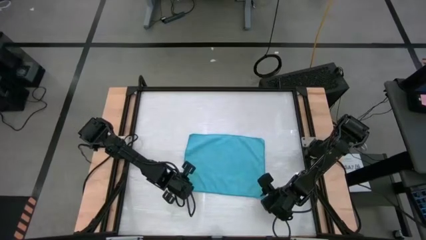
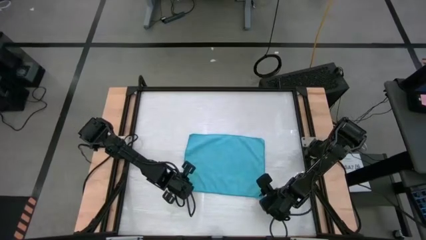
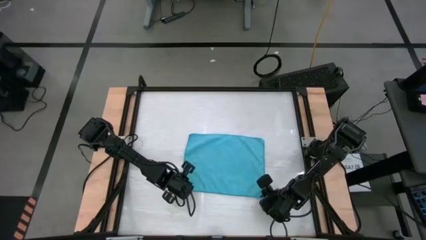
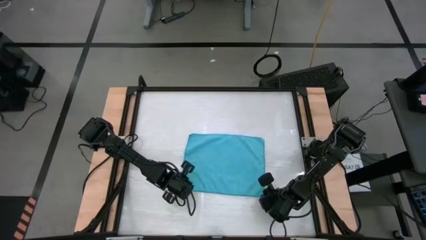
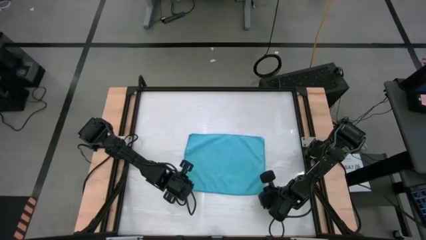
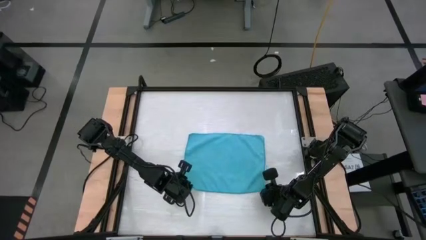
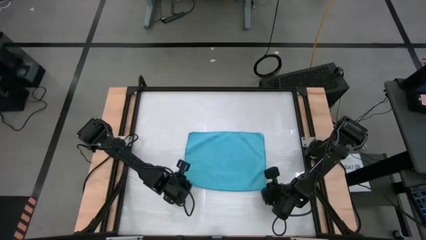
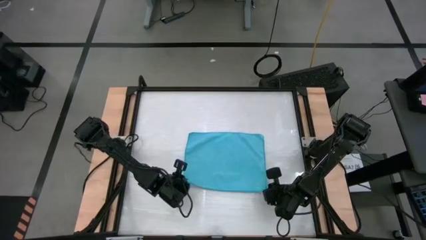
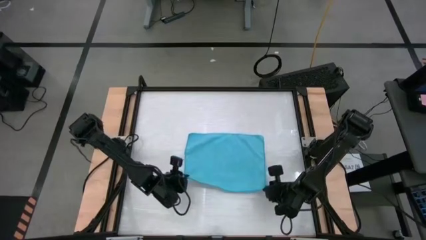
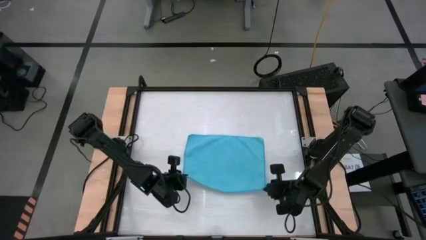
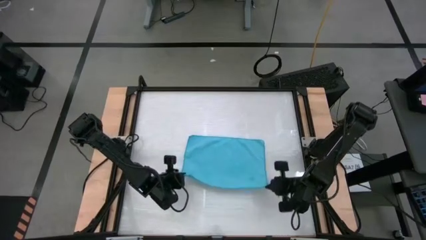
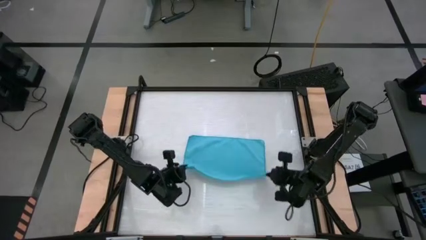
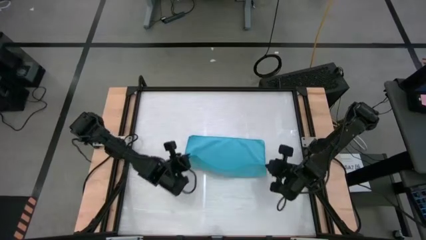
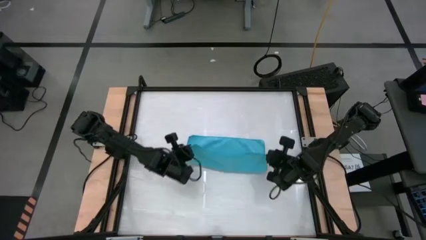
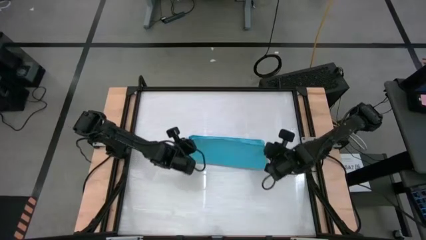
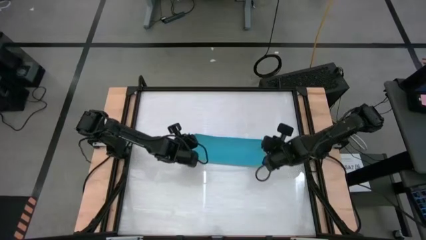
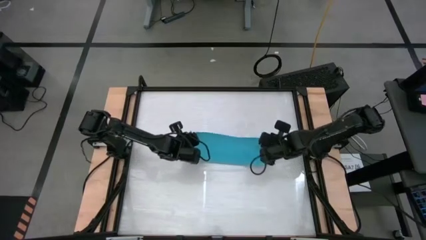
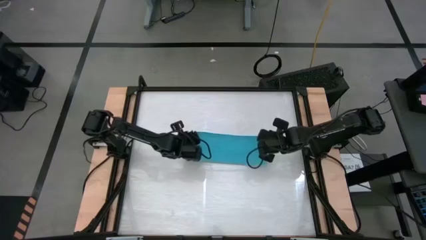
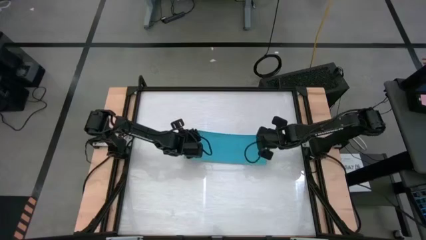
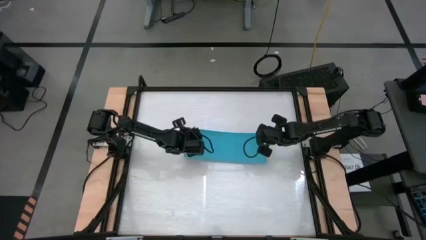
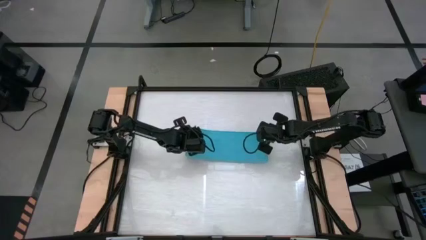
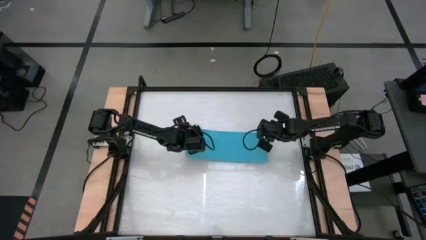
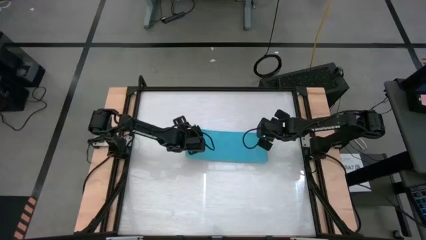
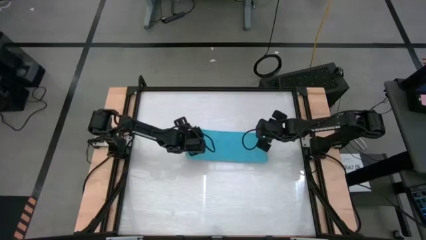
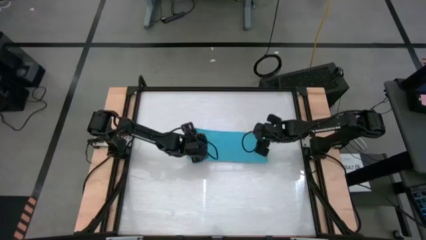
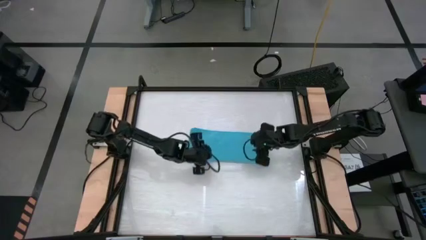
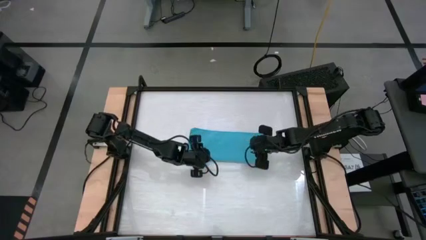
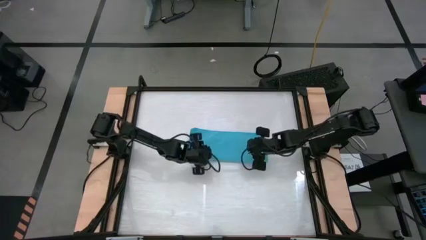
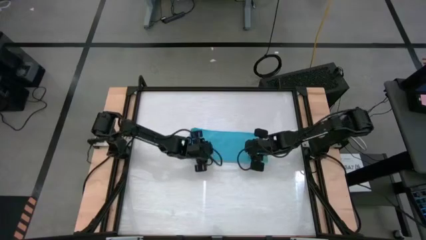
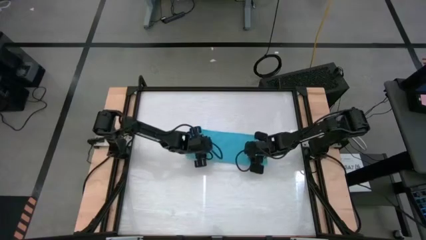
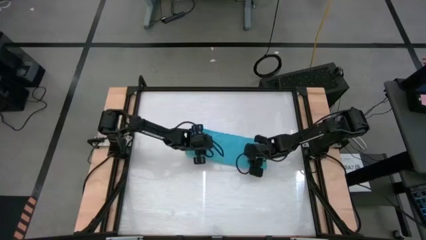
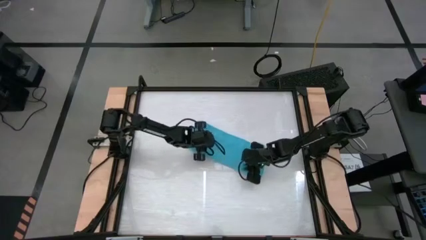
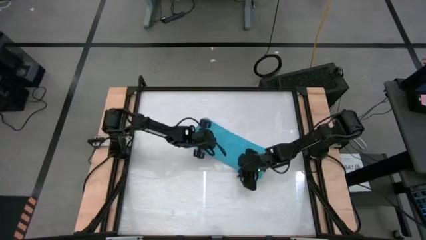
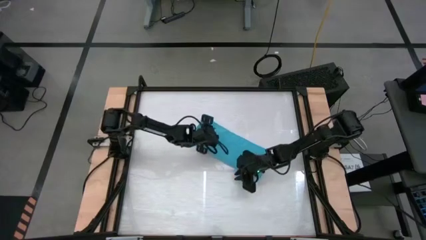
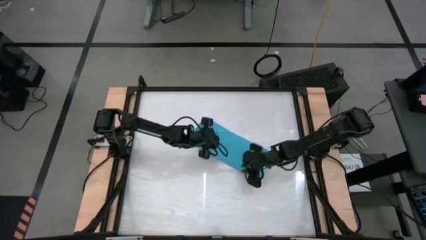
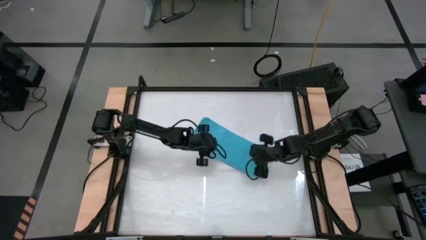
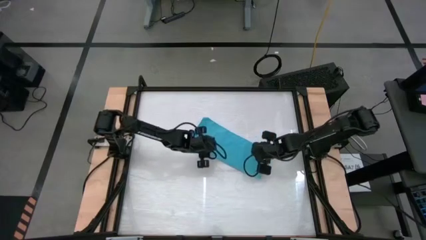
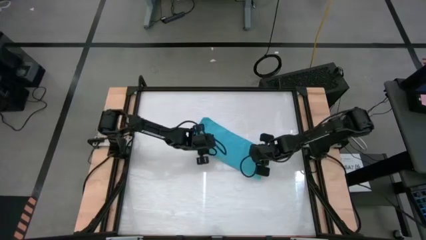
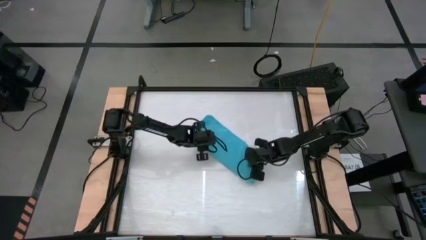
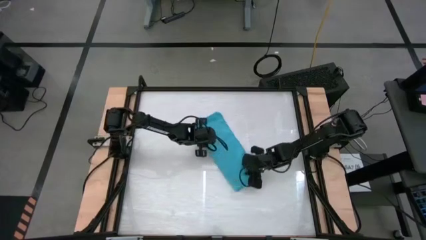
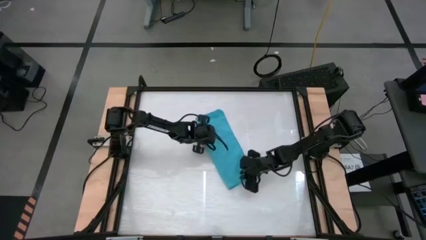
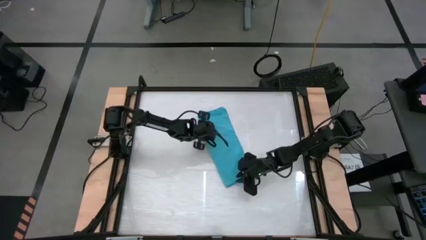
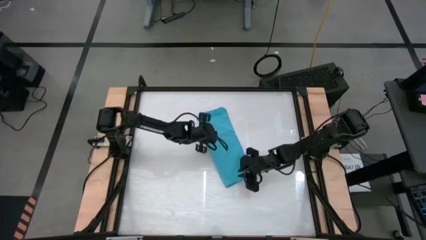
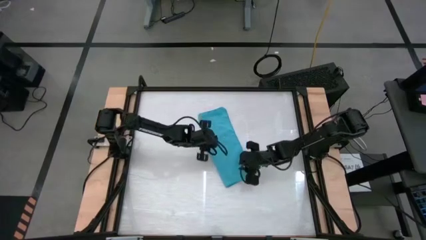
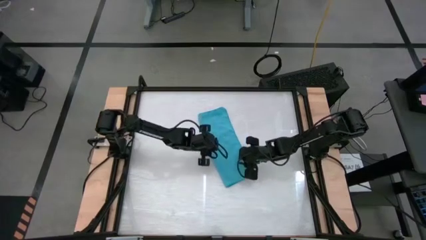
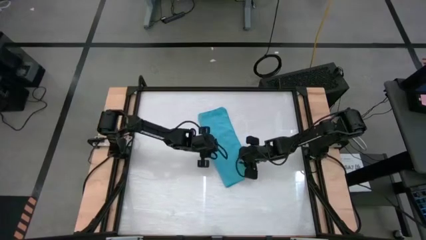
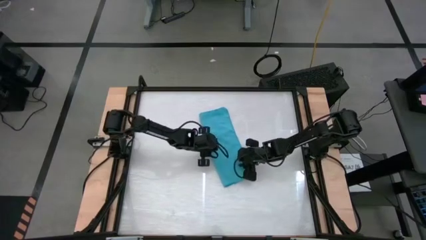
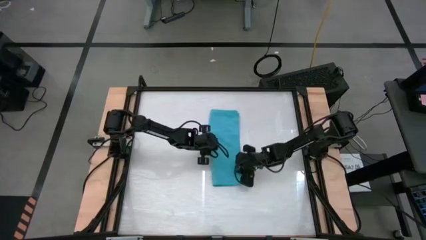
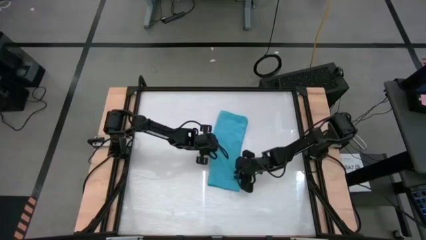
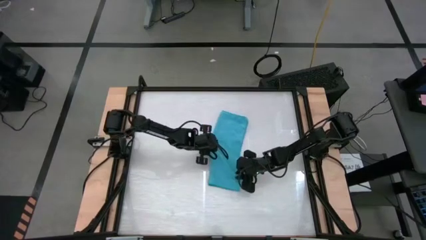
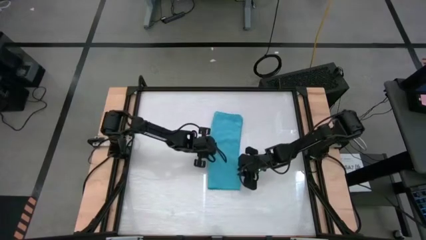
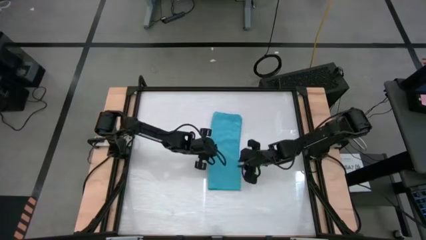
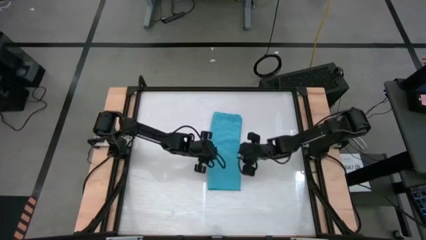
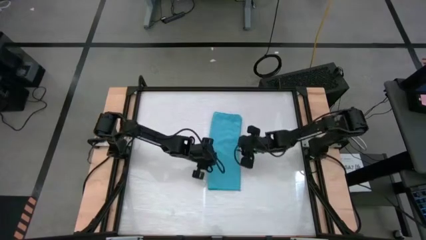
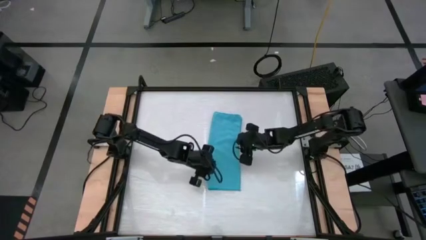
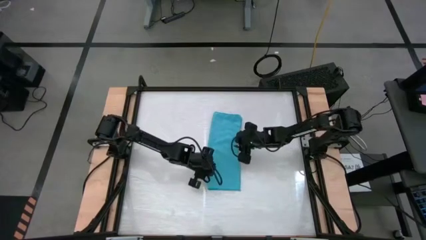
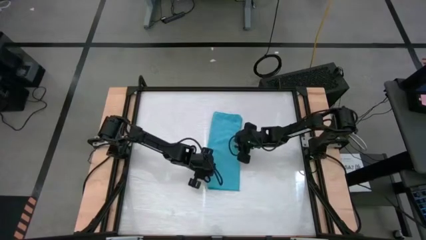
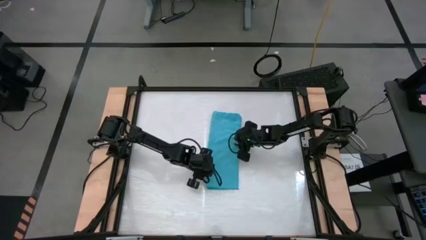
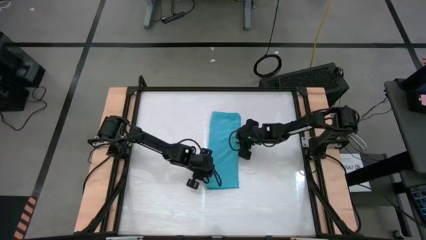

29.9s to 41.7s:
Task: Roll towel
Fold the blue towel

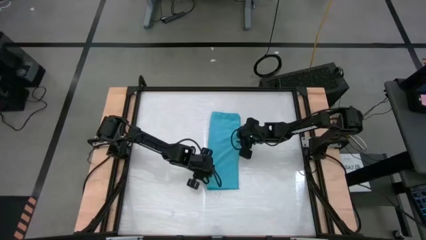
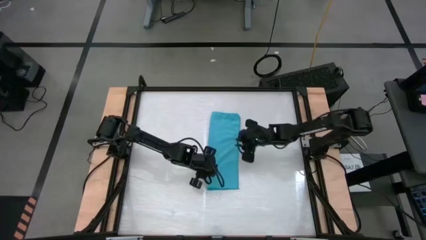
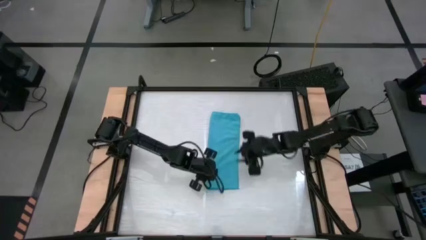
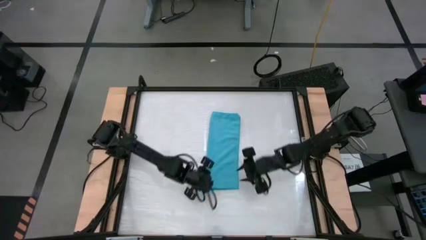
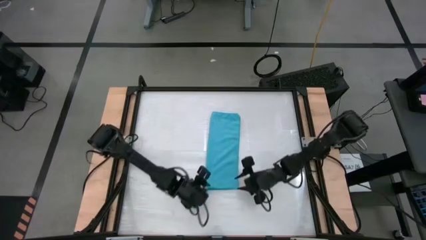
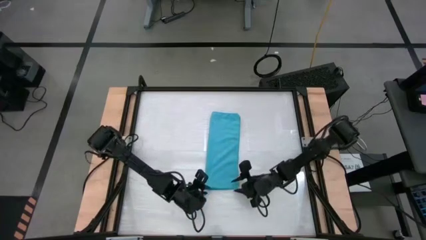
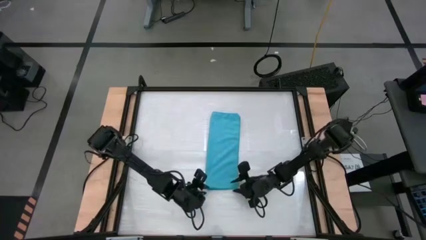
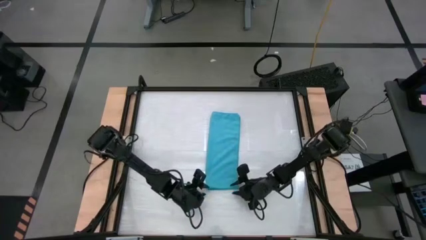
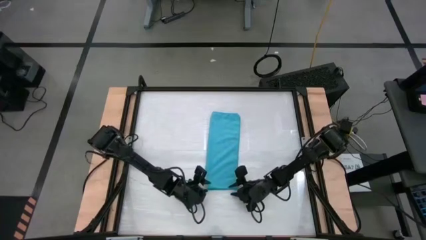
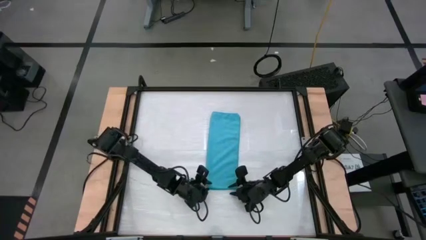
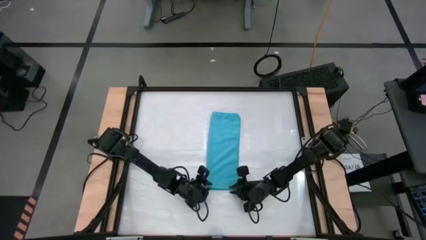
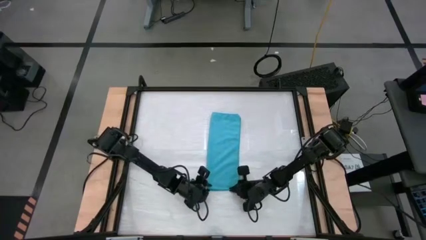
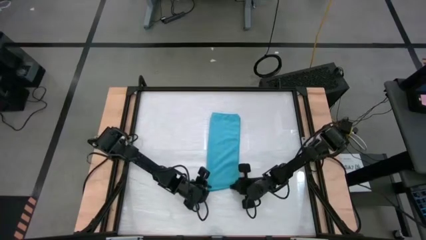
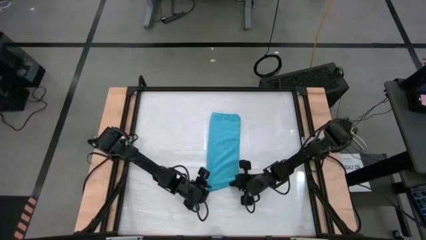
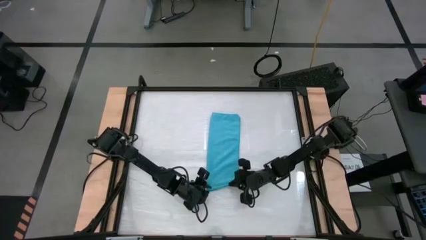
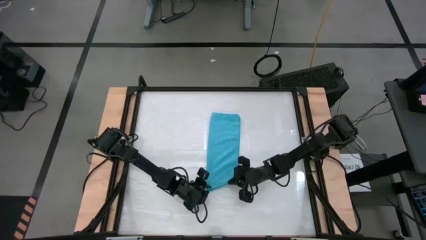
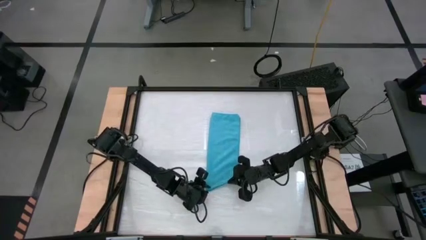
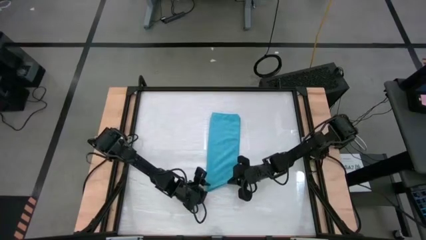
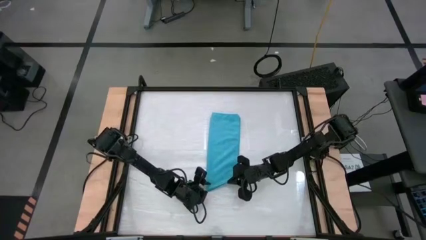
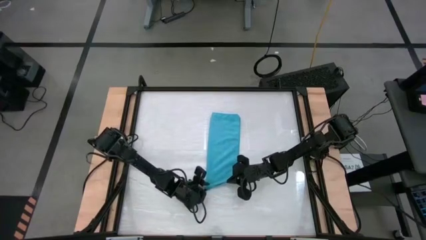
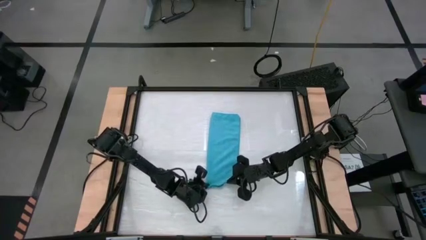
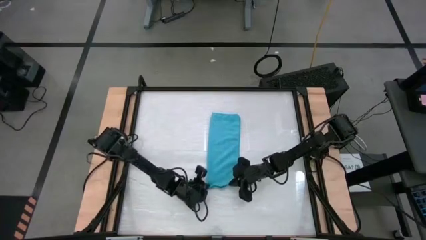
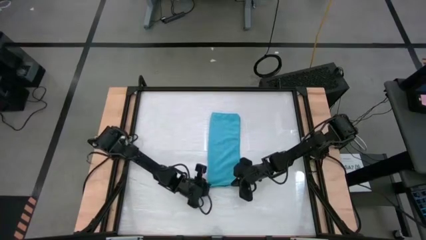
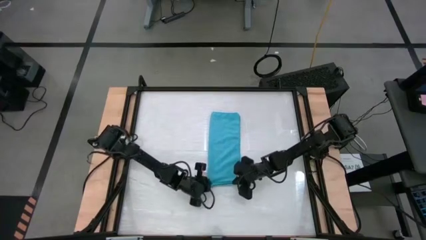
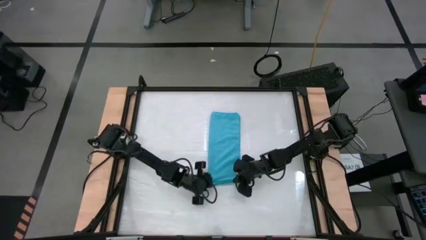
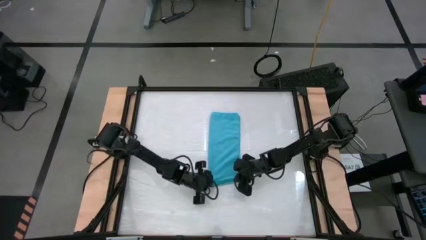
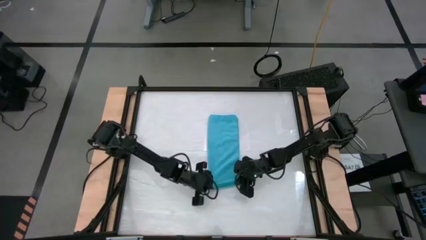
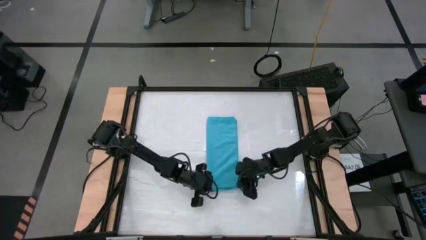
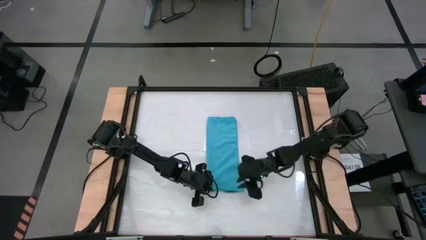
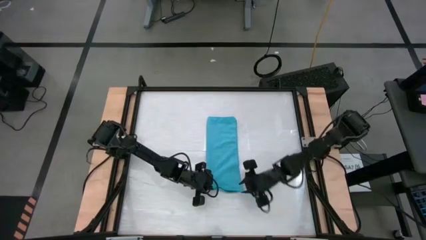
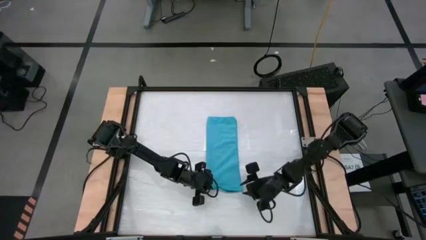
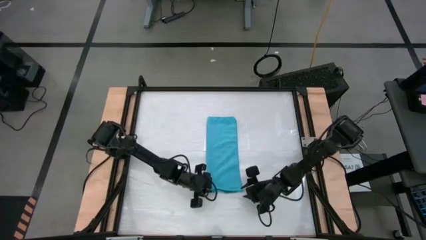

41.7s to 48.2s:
Roll the blue towel
